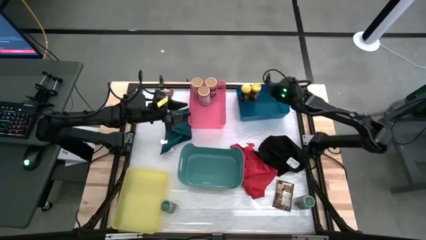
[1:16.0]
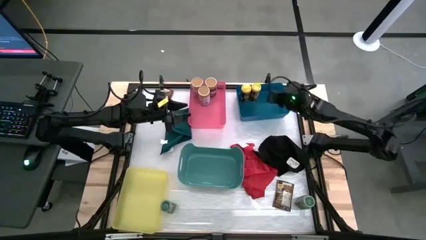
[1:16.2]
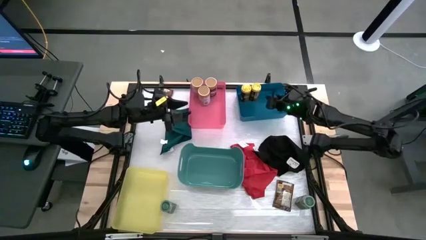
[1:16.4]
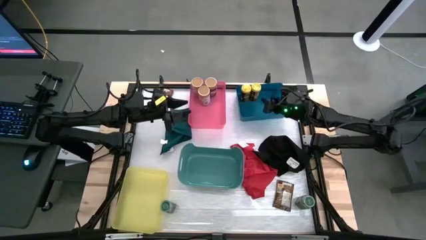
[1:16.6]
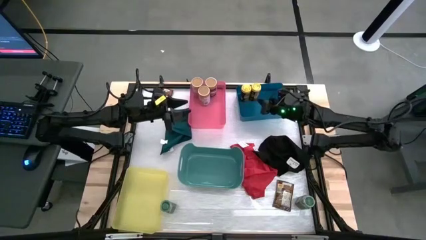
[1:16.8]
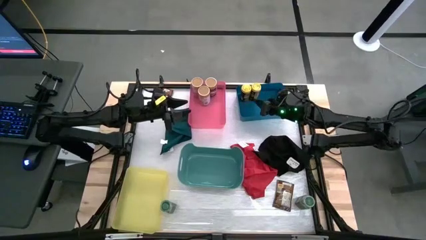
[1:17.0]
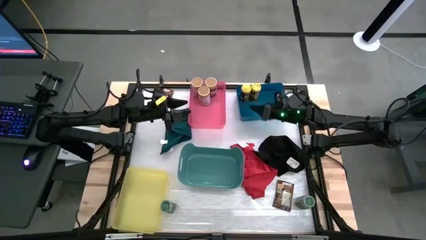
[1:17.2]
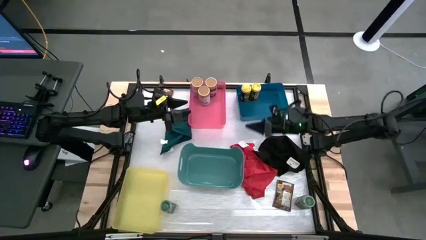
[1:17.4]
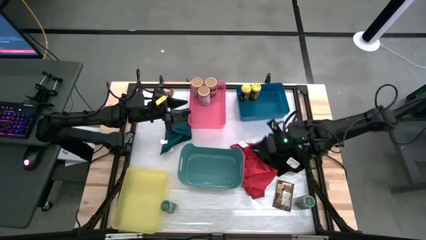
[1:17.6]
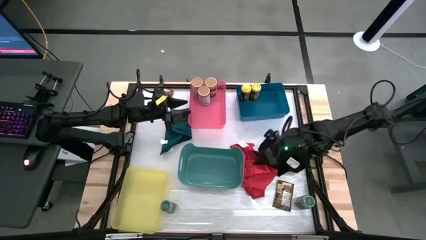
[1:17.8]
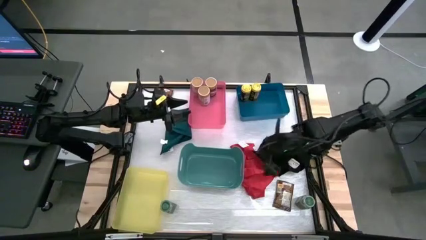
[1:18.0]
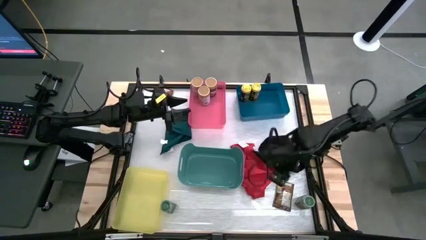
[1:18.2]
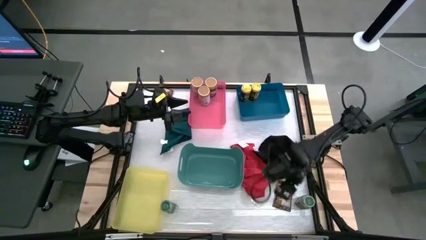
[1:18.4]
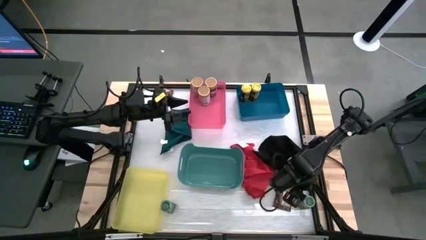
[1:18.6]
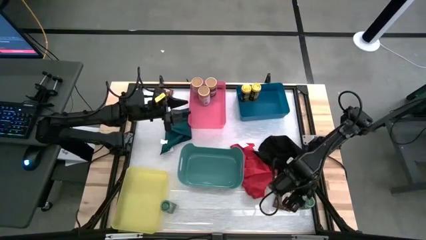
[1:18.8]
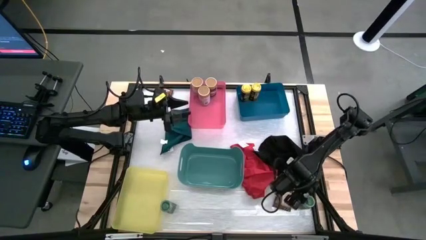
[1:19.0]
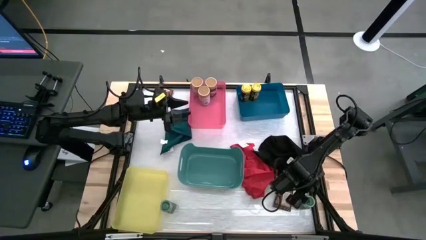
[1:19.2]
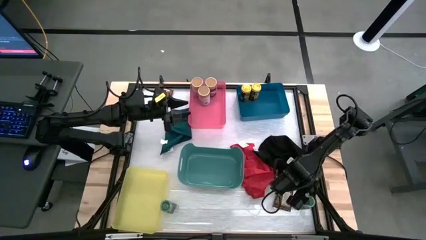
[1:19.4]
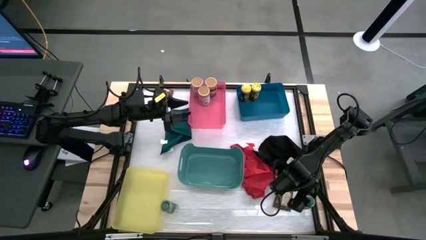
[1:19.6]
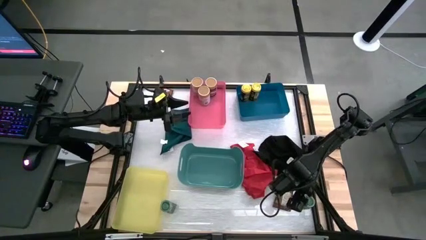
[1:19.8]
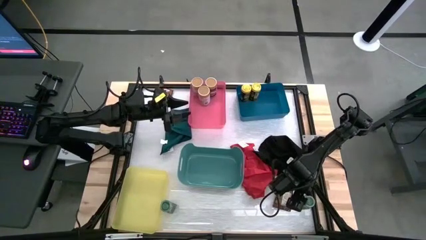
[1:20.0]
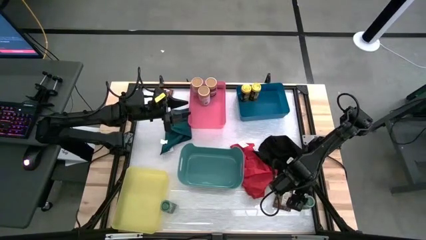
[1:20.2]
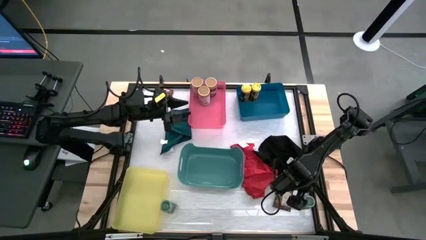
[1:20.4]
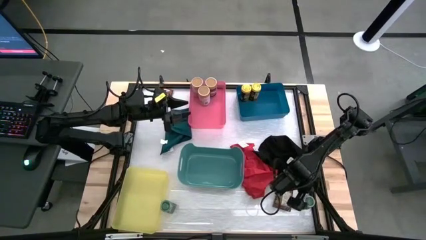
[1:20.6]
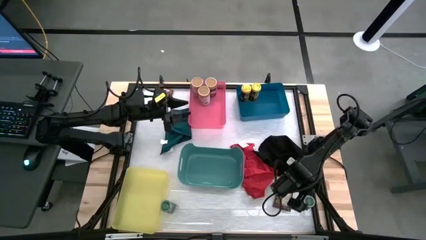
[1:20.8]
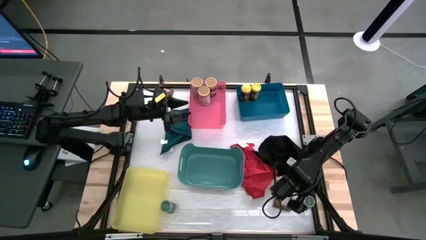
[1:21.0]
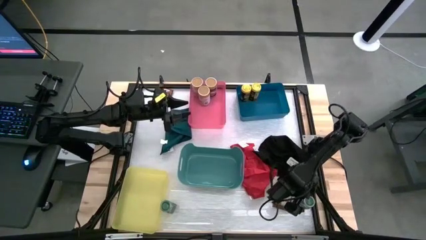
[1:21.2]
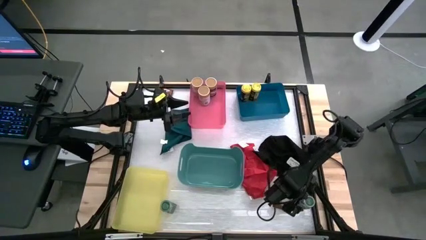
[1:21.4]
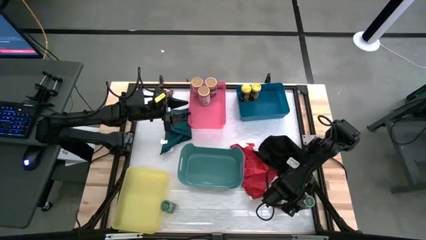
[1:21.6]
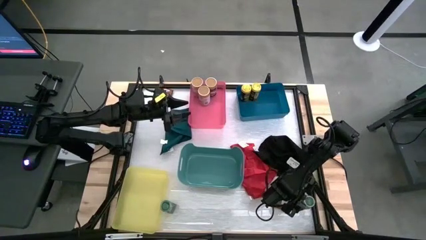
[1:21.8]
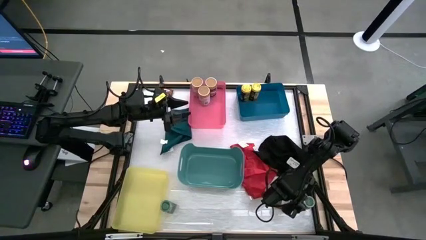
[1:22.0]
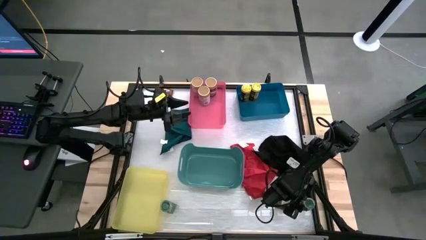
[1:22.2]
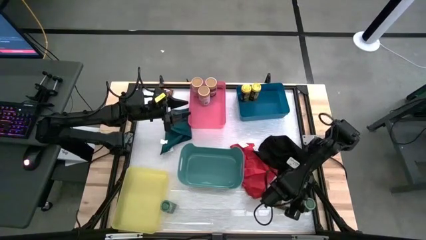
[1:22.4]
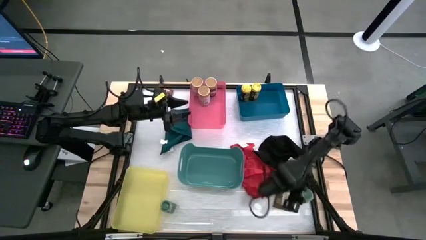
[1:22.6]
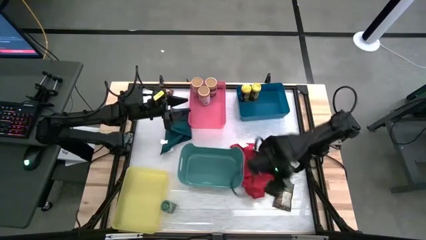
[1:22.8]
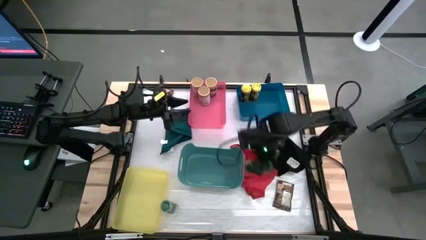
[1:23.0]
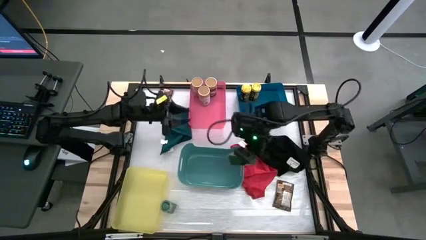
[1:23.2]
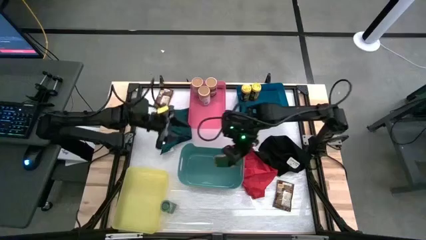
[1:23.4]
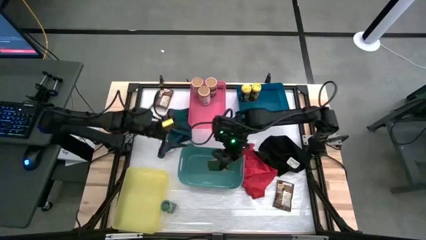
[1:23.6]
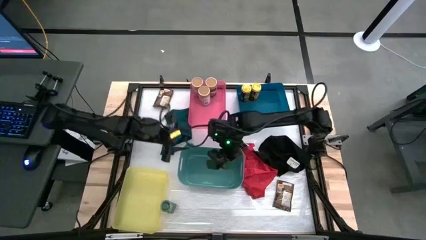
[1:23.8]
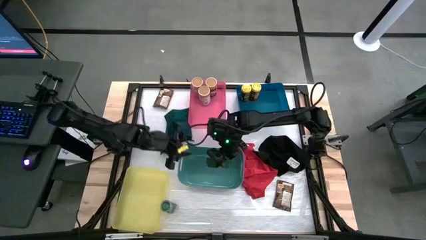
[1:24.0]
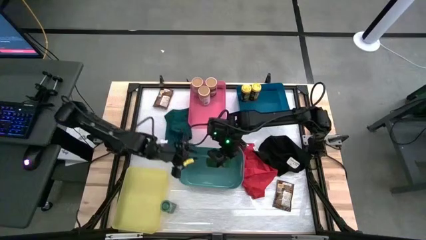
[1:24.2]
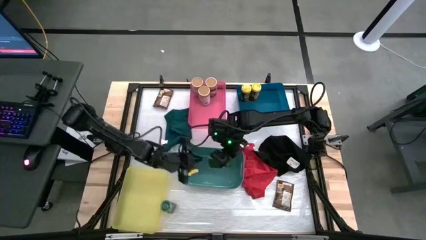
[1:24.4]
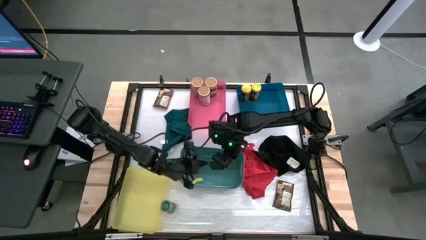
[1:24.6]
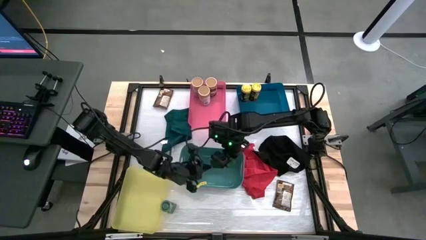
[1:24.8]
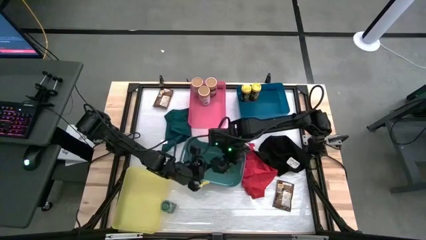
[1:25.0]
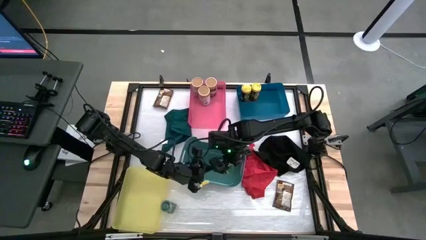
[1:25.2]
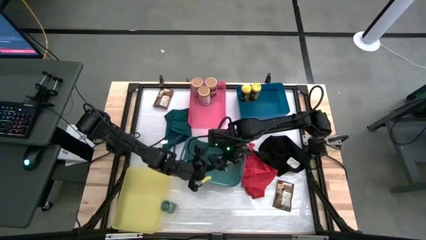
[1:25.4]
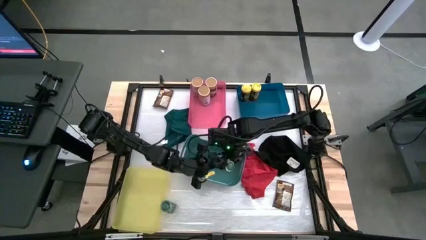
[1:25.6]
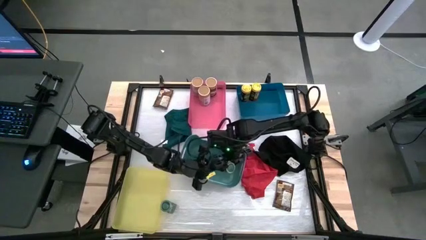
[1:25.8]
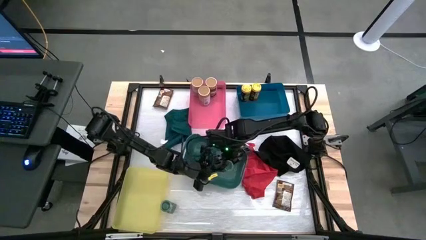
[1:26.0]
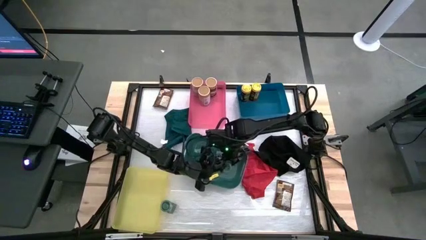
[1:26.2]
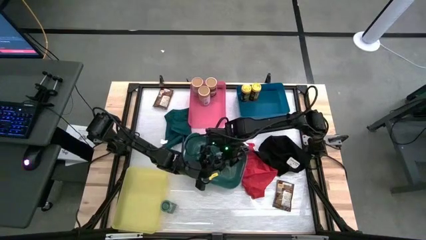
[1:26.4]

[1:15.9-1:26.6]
Task: Sort spices by type
Put the right green seasoning bottle into the green bin

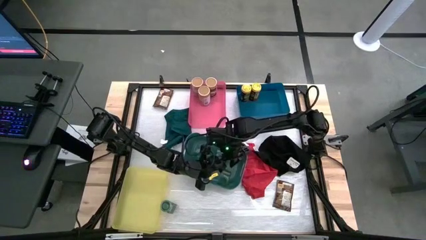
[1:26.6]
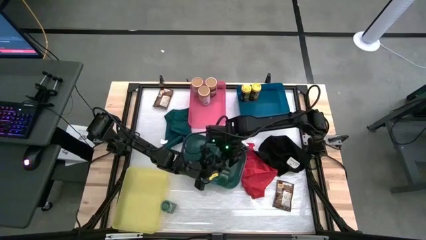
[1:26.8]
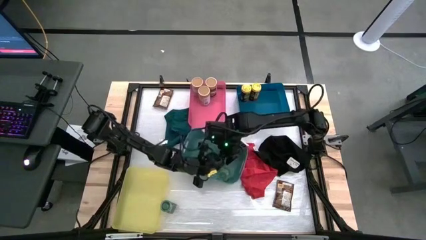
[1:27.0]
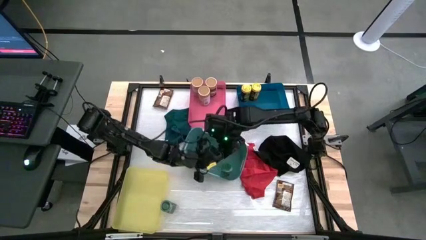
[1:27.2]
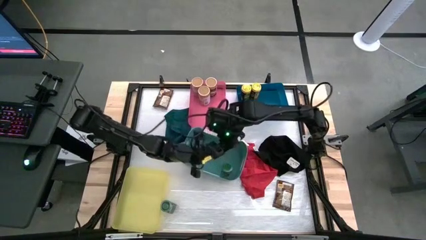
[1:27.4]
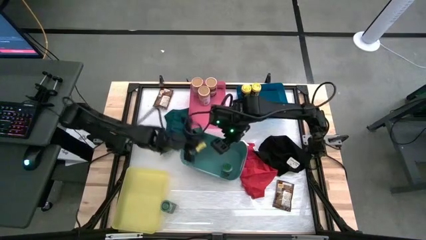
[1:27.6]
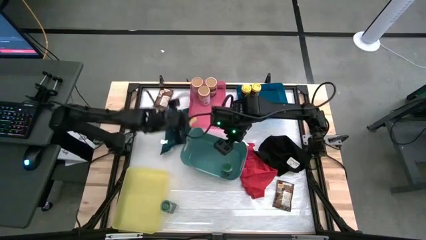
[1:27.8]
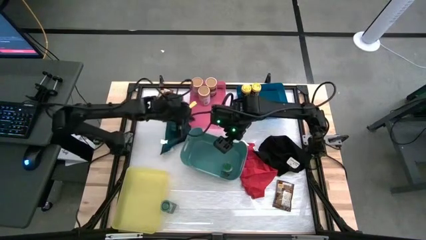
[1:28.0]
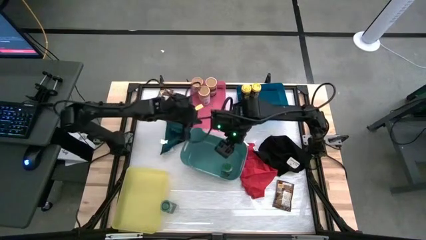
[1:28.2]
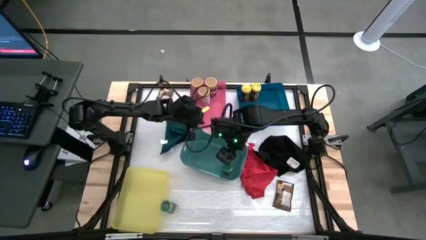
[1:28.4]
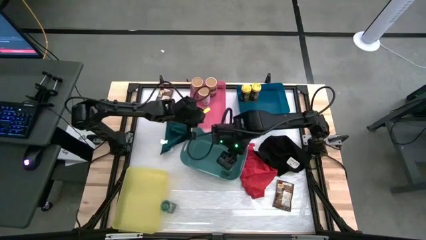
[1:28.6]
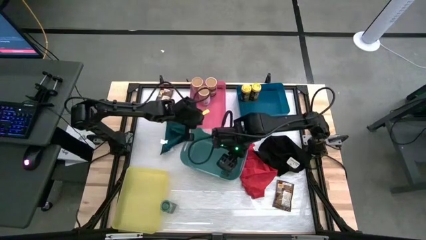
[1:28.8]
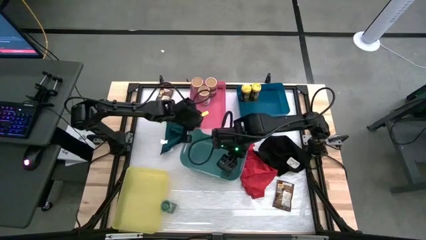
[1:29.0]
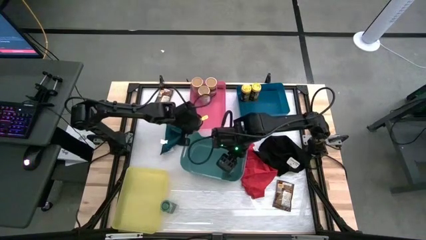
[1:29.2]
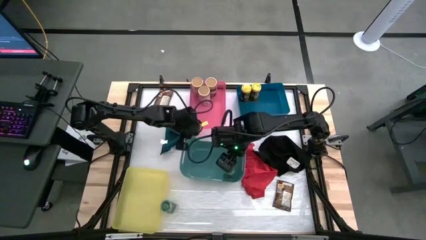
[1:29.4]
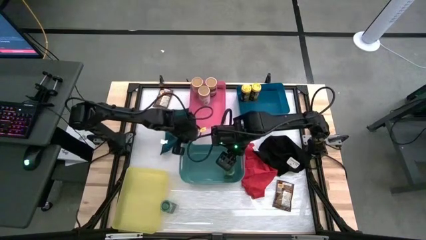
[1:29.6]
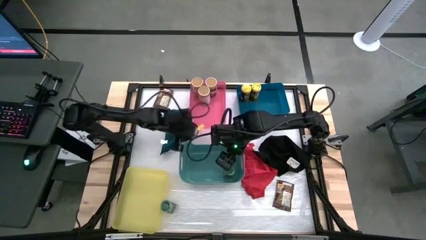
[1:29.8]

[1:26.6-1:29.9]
Adjust the green bin

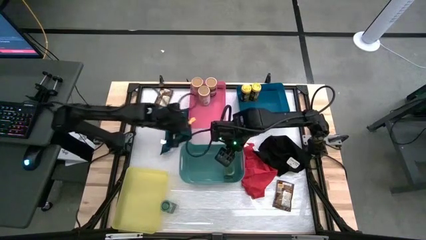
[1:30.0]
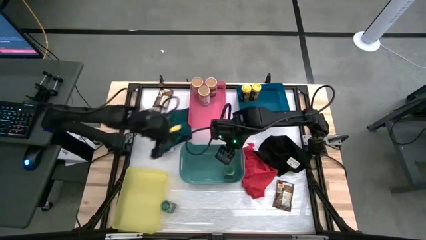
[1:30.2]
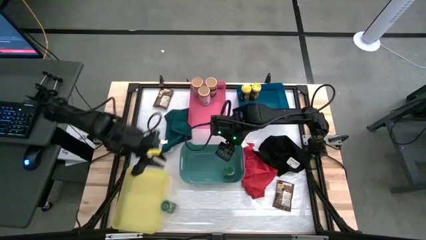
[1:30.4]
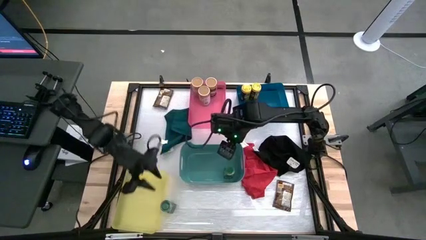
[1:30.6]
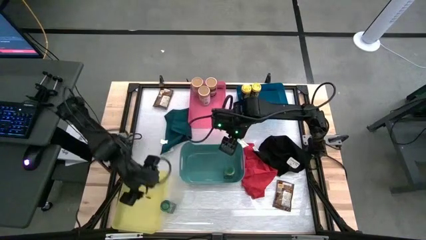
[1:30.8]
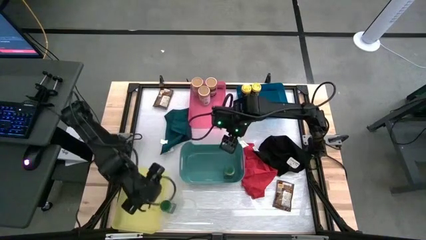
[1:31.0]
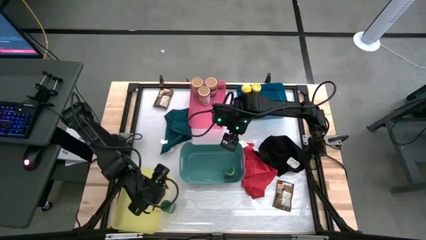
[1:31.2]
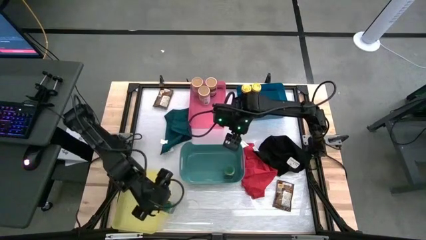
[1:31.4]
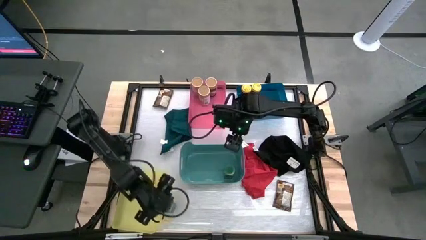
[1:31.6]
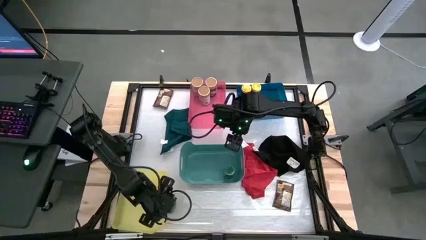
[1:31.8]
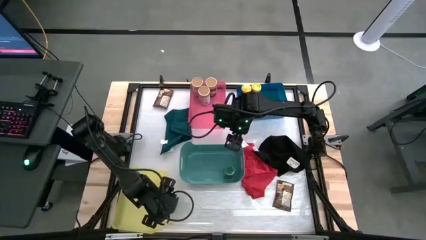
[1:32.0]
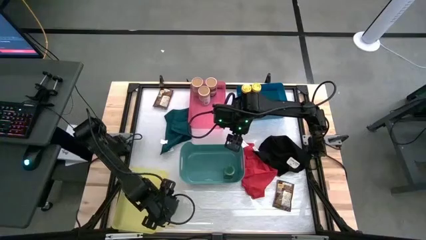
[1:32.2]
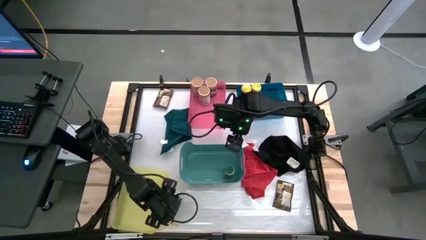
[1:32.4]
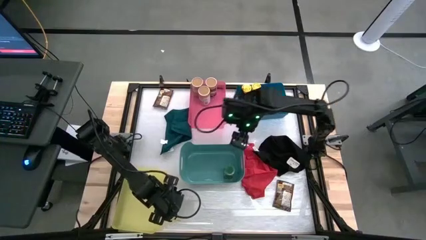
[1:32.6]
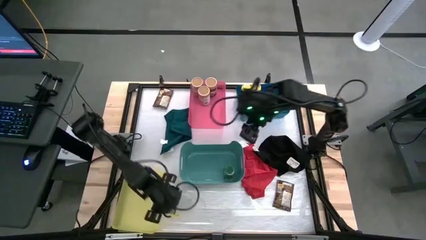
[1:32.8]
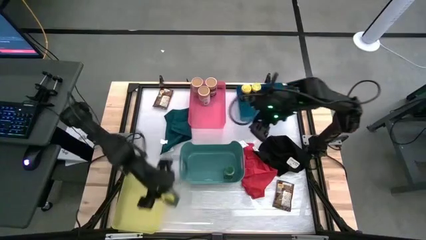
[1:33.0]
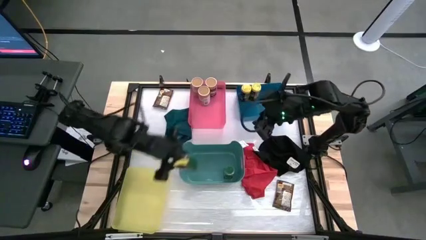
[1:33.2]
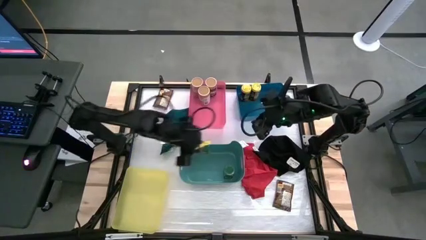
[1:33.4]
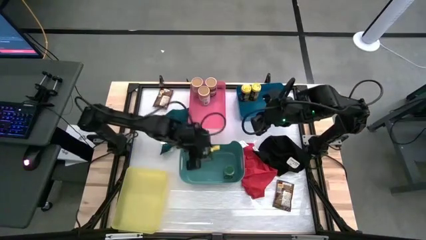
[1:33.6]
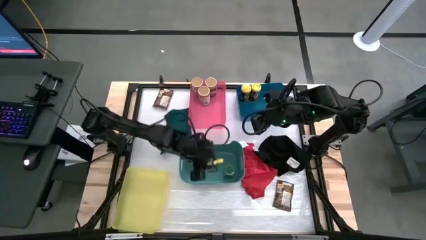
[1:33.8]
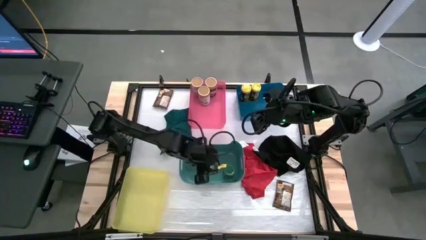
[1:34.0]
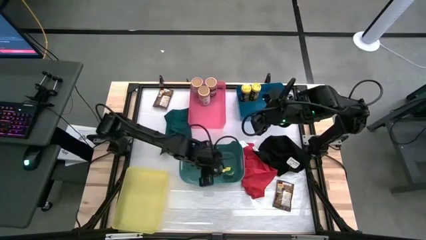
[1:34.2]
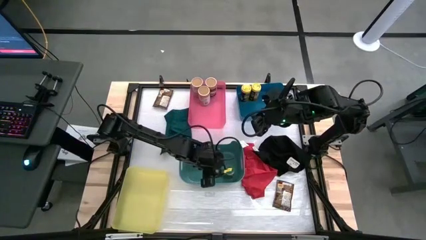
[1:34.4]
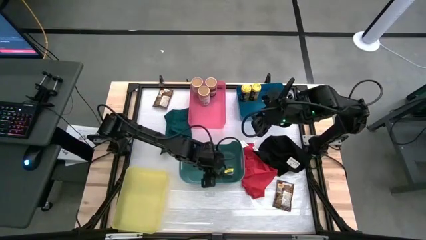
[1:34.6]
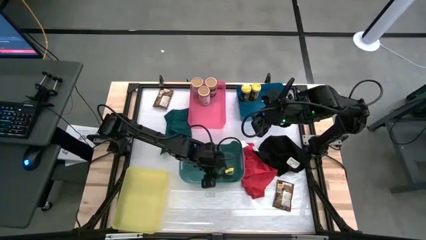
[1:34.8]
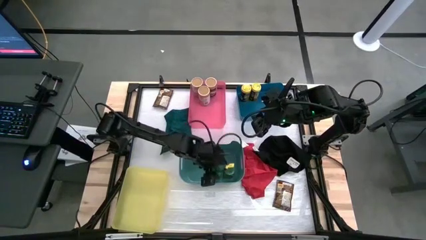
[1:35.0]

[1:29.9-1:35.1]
Put the green seasoning bottle into the green bin
